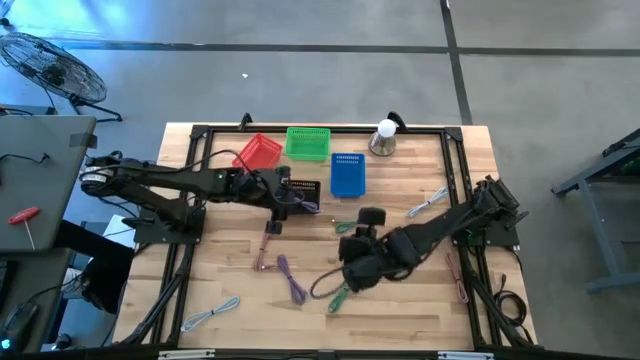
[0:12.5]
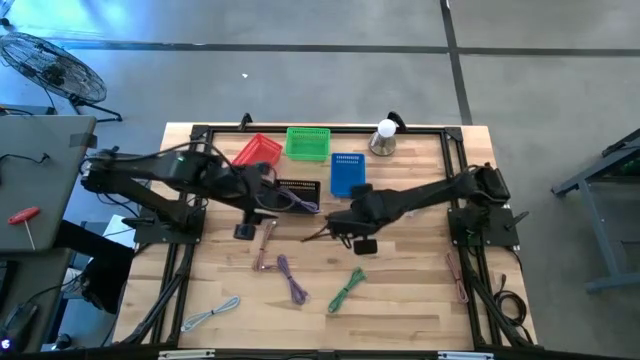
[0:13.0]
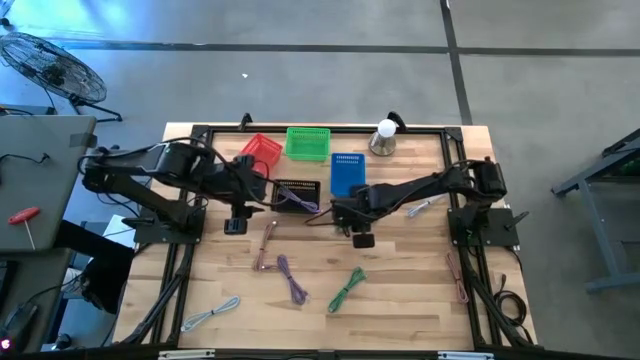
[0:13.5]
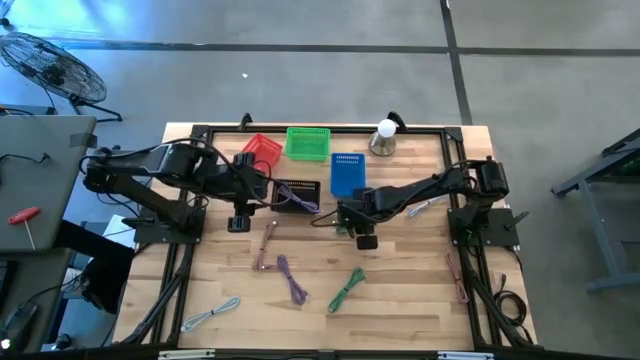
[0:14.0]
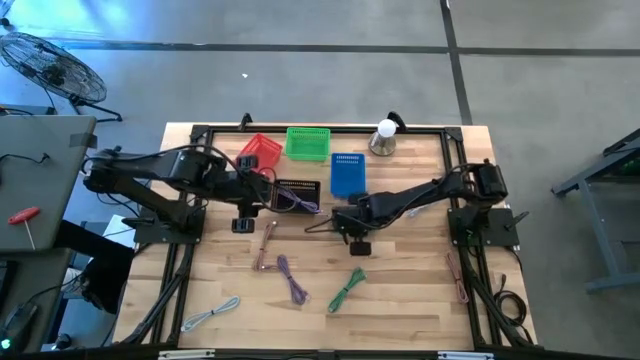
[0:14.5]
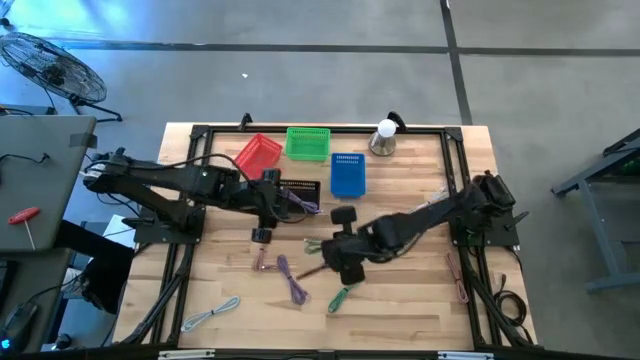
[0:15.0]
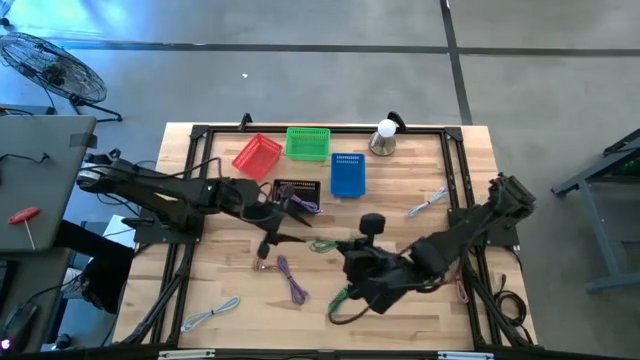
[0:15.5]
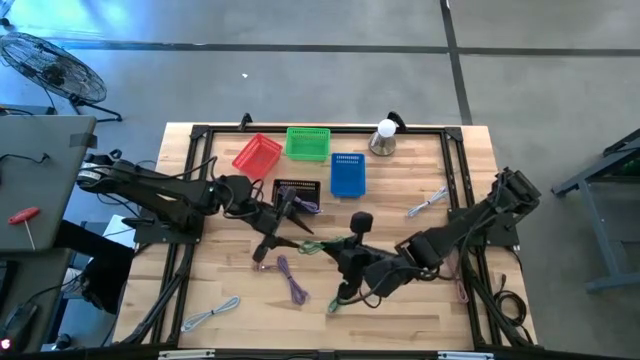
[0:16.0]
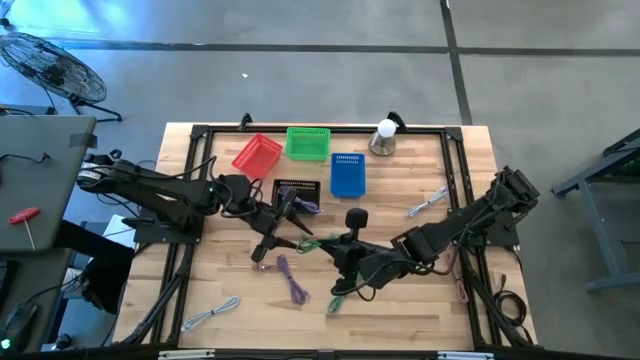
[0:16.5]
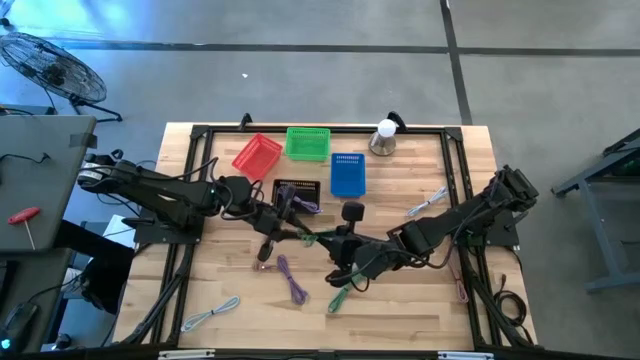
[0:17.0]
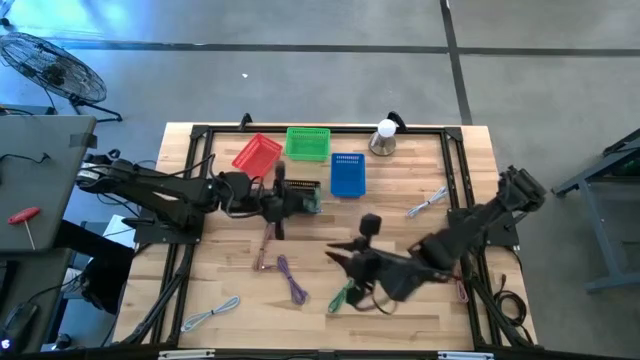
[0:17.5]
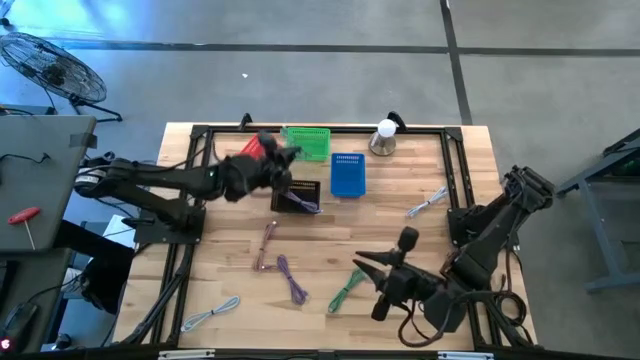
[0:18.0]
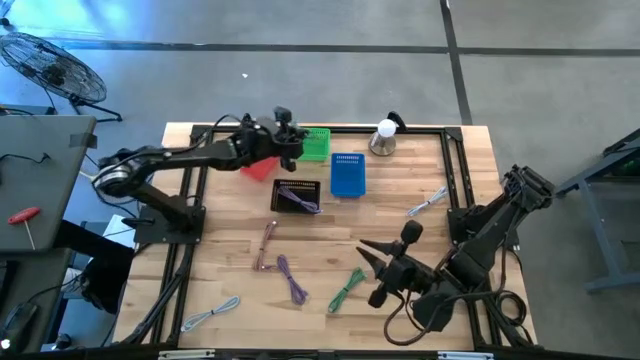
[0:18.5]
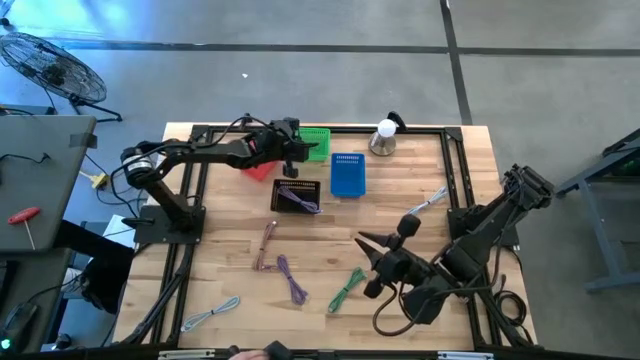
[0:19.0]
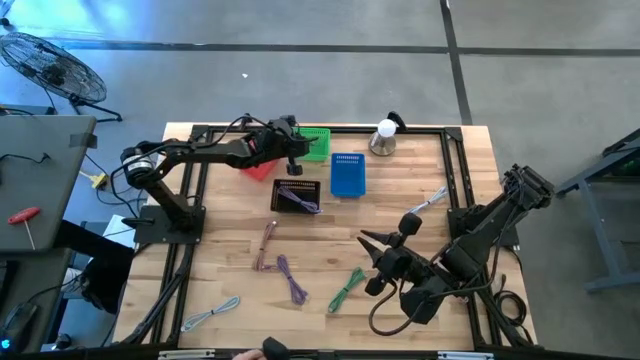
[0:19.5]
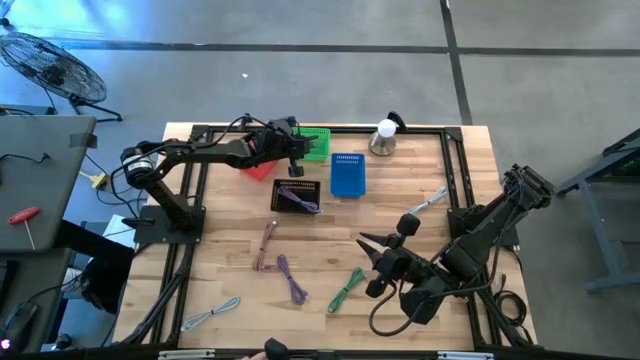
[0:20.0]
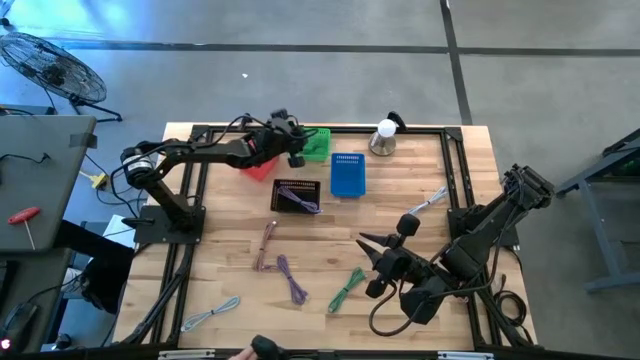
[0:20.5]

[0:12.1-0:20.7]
Task: Pick & Place USB Port
Put the green usb cable into the green bin

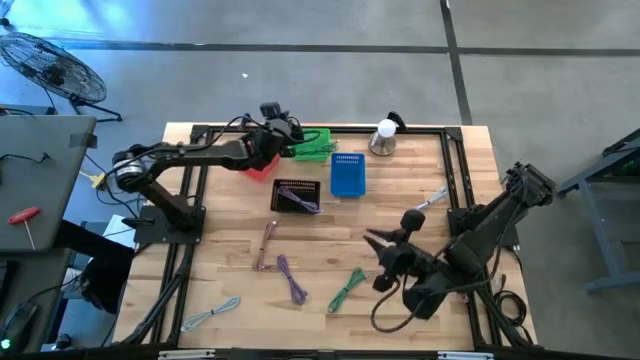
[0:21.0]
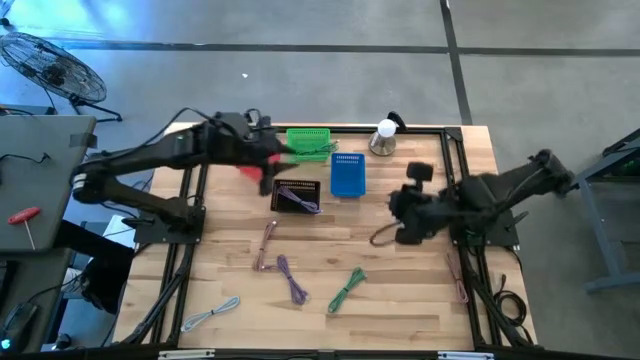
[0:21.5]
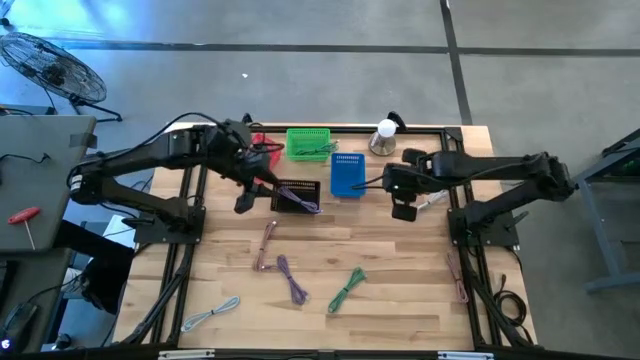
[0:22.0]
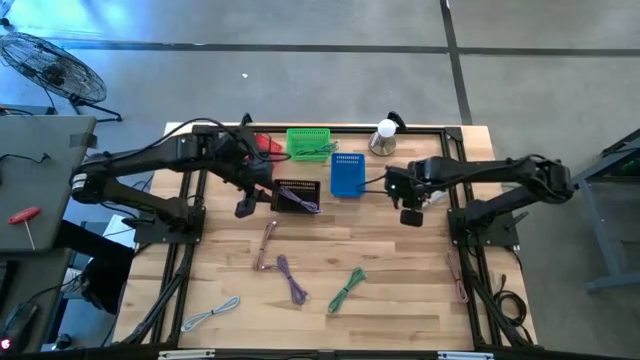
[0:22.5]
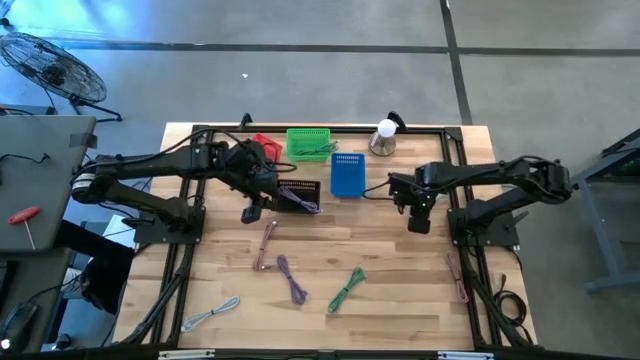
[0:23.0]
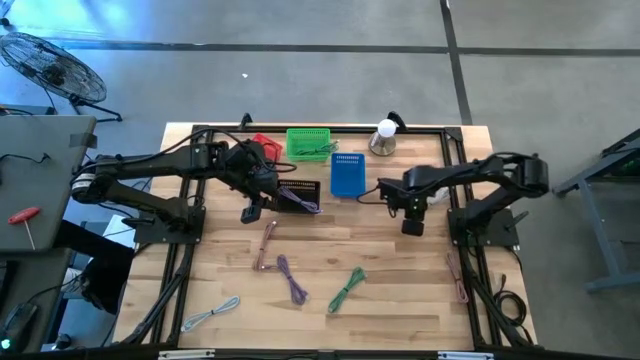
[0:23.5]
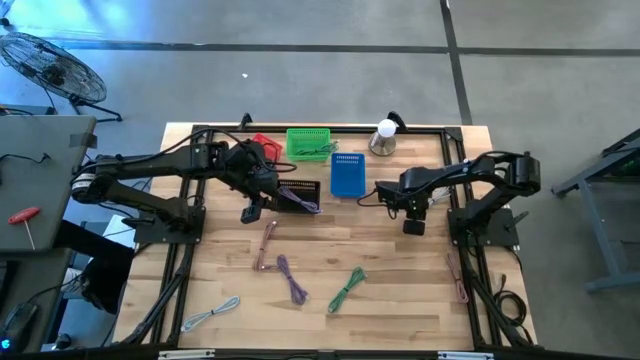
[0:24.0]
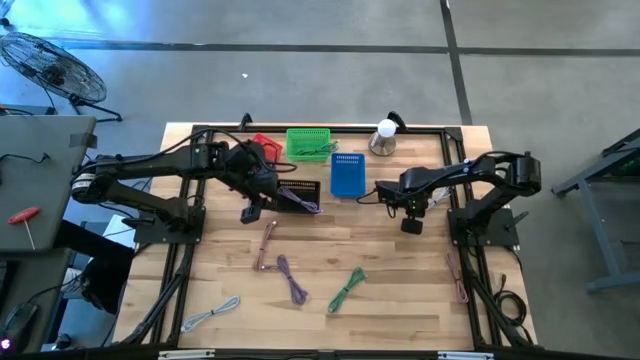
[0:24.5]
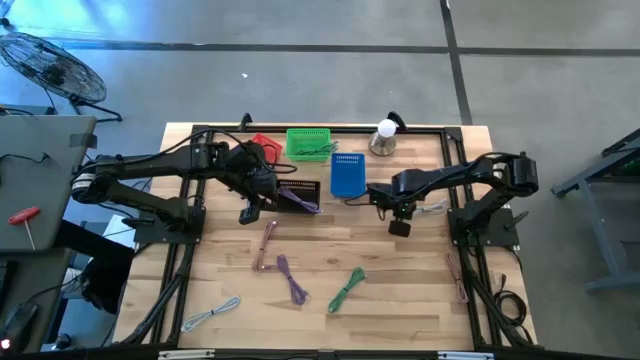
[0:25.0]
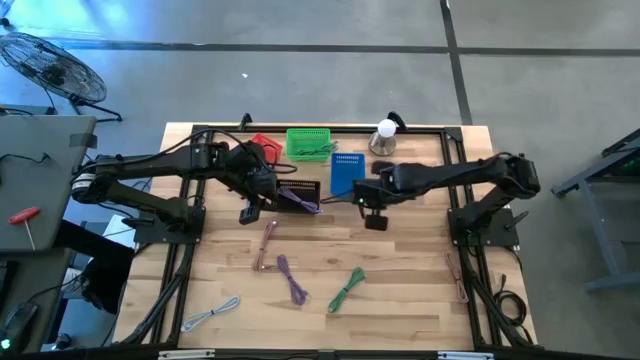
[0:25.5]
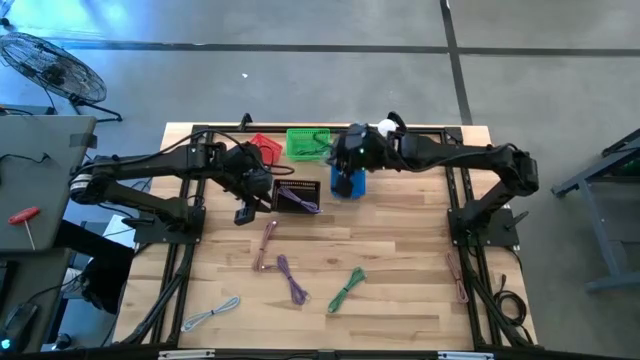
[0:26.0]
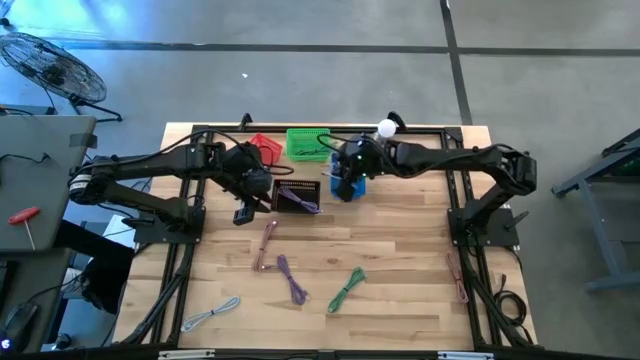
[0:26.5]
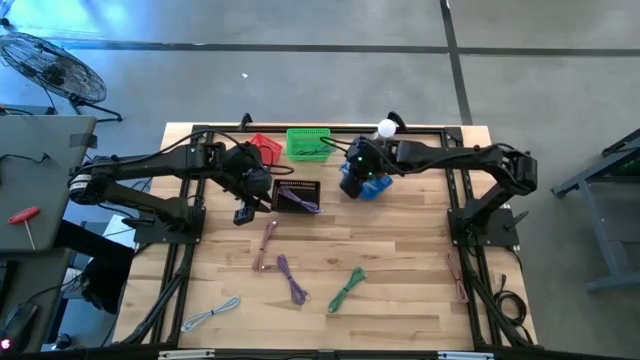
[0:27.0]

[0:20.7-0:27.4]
Put the blue usb cable into the blue bin

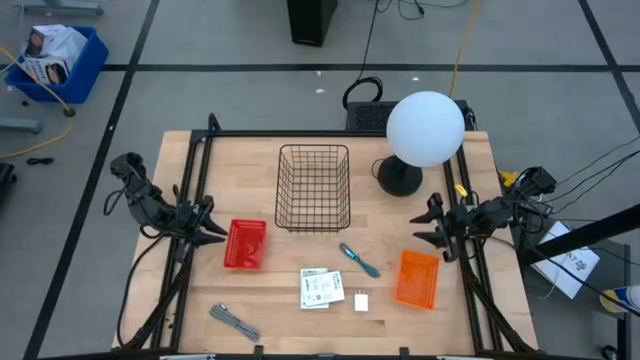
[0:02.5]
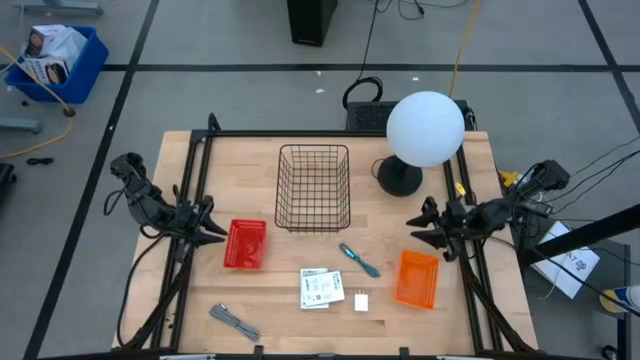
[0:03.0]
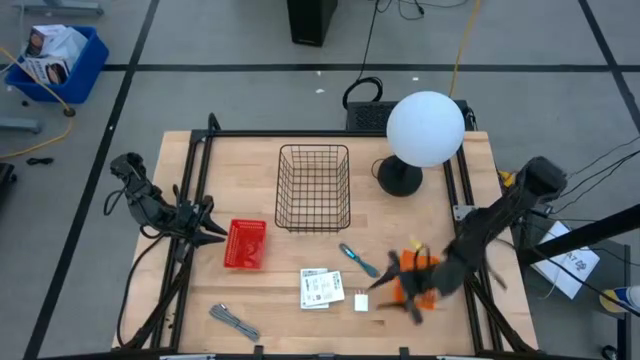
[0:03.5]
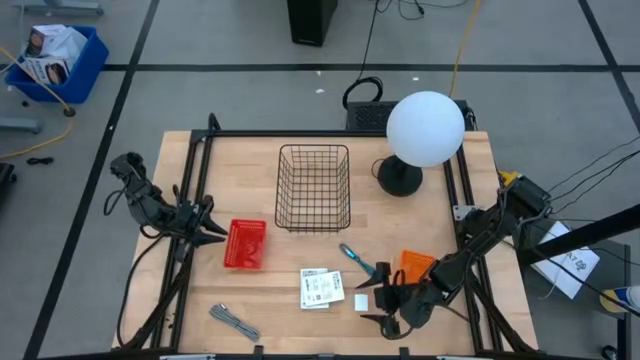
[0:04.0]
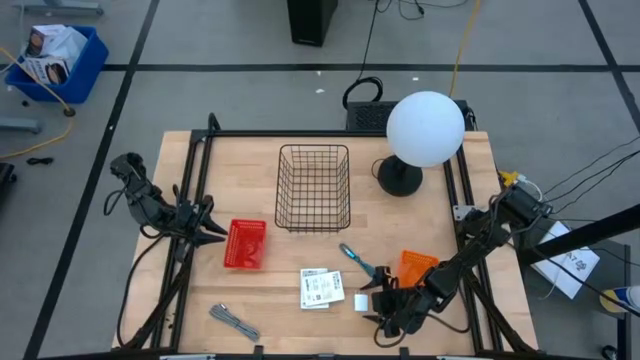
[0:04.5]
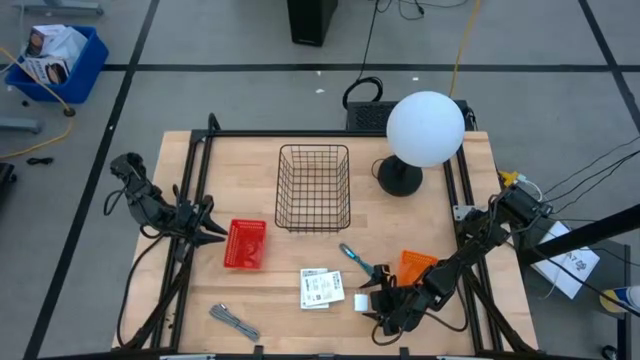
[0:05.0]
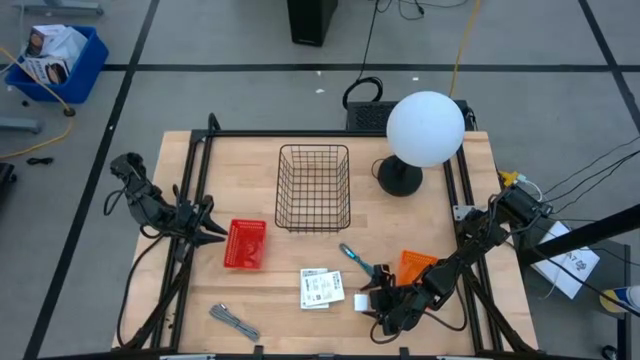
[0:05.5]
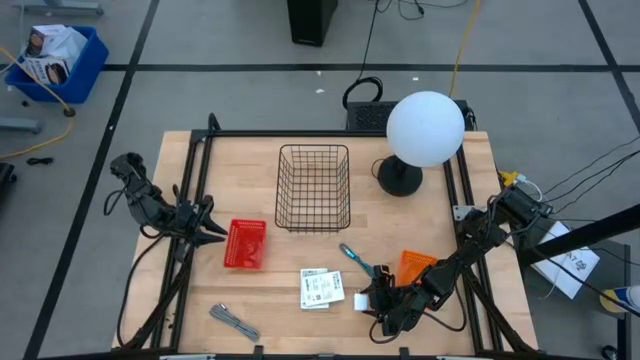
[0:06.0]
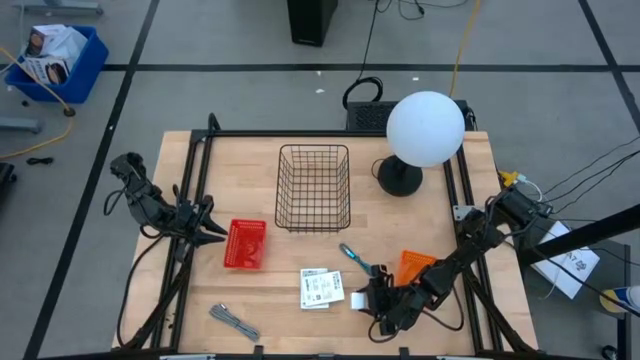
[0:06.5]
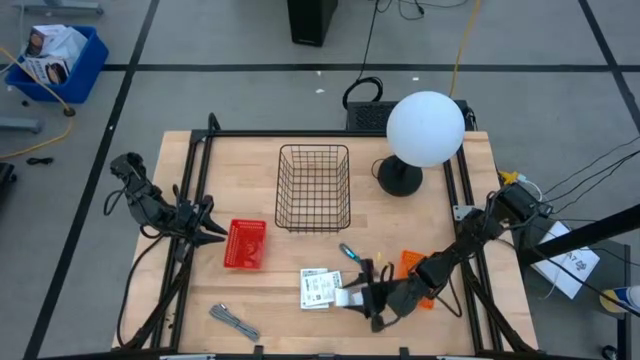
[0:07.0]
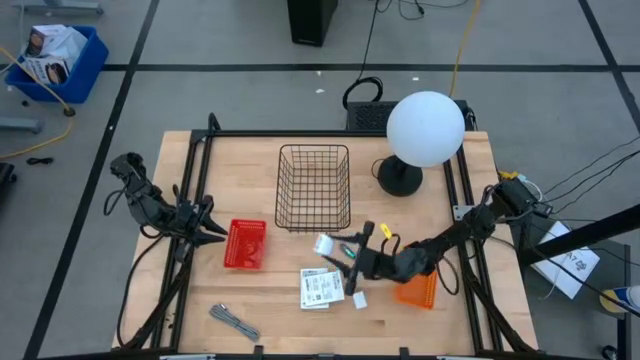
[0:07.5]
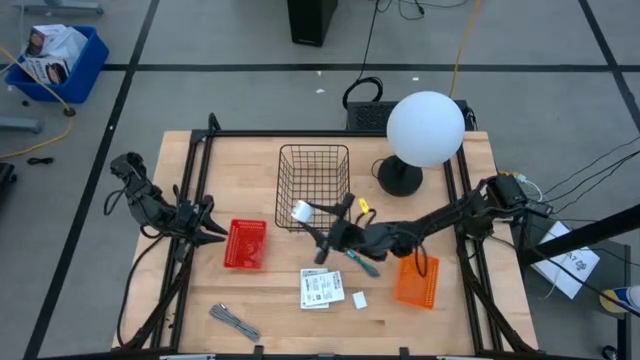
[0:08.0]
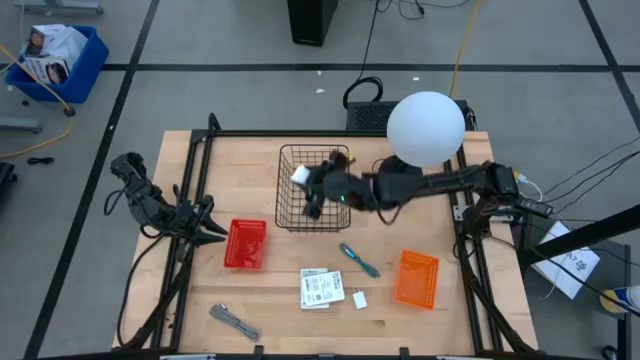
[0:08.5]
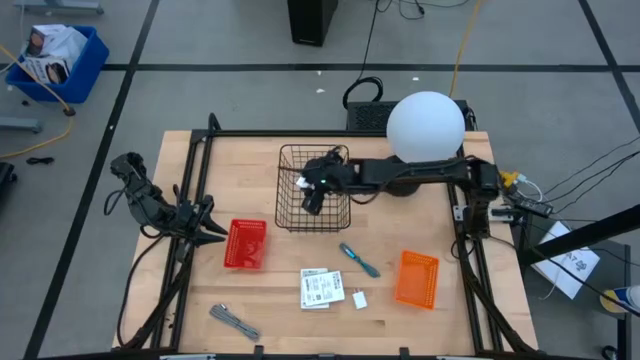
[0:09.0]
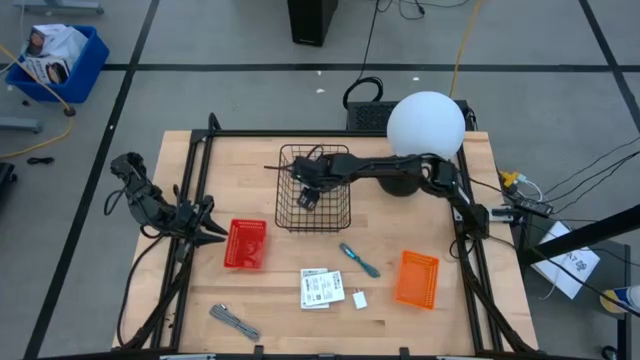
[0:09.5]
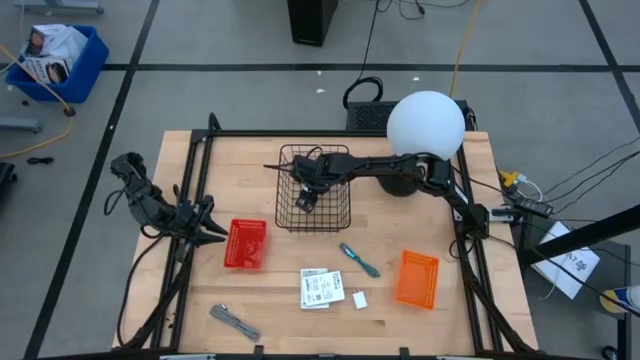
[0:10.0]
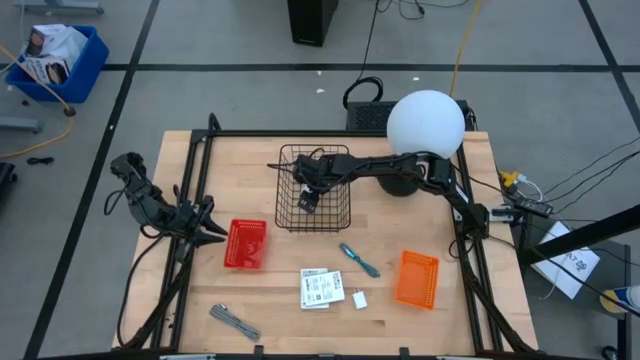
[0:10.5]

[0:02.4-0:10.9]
Task: Pick and place items into bin
Put the white charger adapter into the black wire basket
